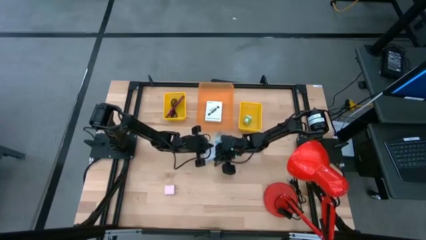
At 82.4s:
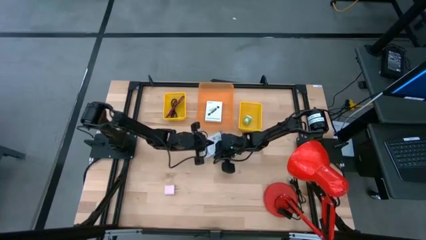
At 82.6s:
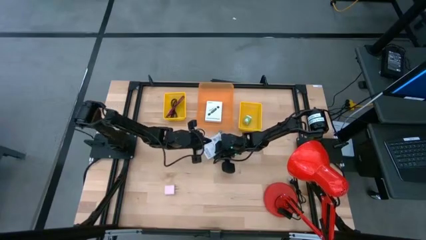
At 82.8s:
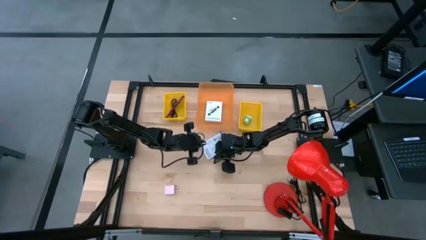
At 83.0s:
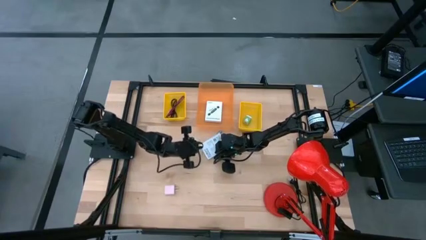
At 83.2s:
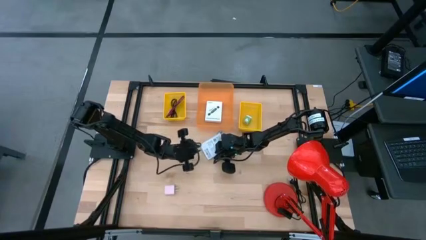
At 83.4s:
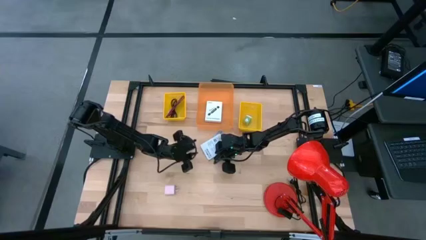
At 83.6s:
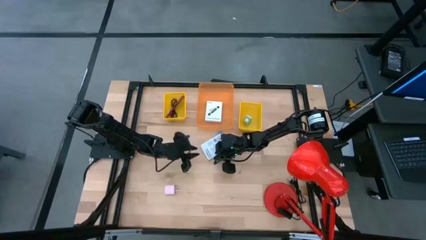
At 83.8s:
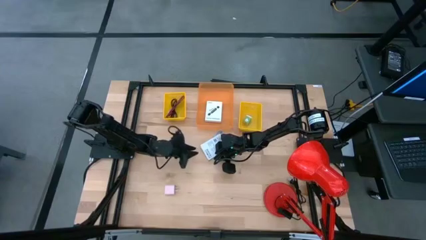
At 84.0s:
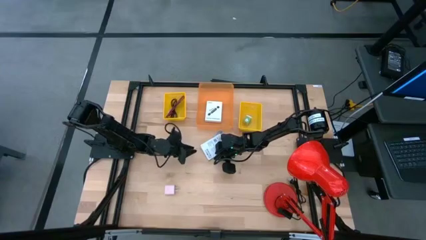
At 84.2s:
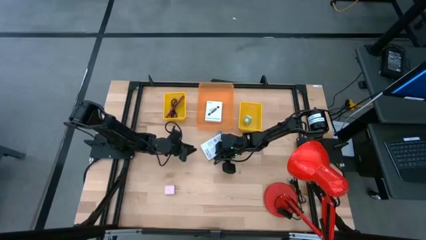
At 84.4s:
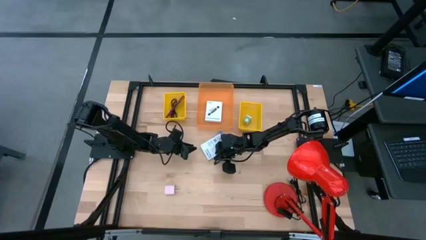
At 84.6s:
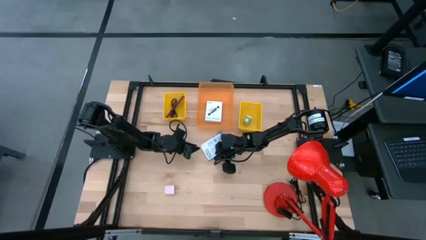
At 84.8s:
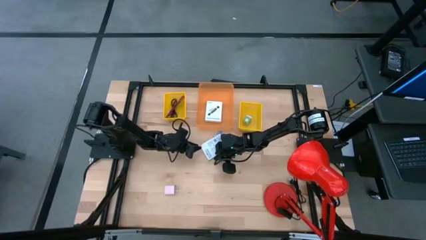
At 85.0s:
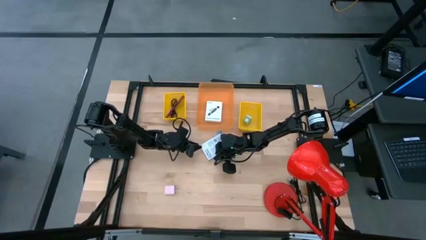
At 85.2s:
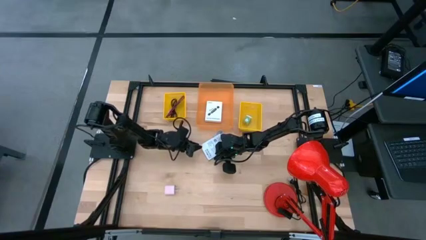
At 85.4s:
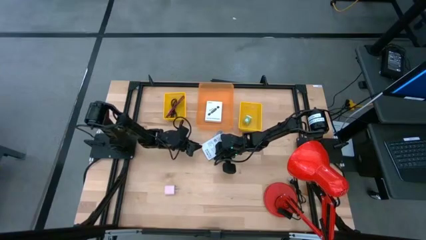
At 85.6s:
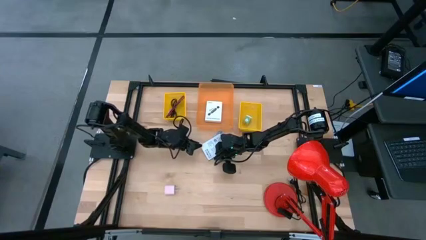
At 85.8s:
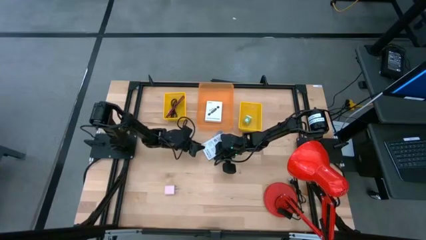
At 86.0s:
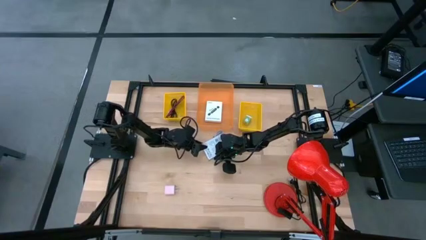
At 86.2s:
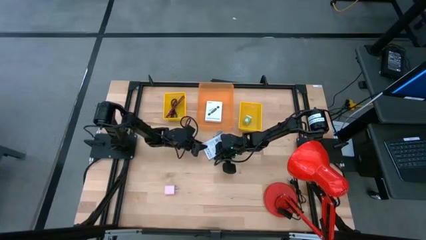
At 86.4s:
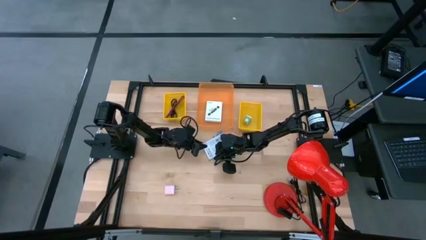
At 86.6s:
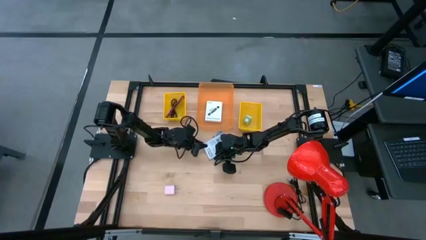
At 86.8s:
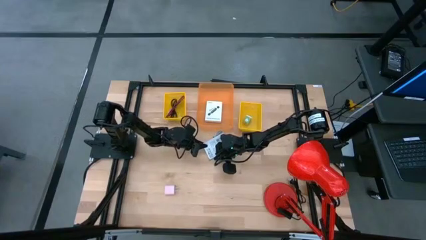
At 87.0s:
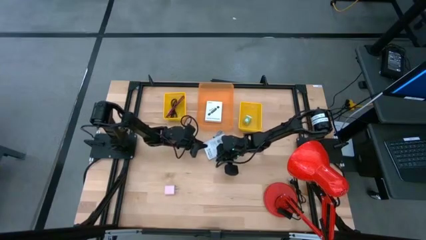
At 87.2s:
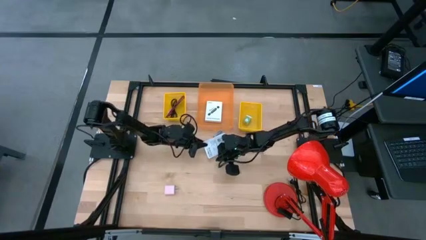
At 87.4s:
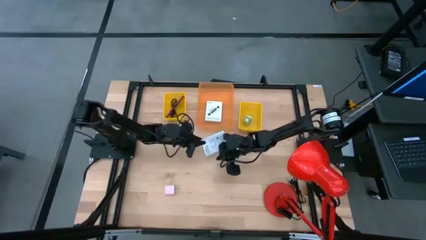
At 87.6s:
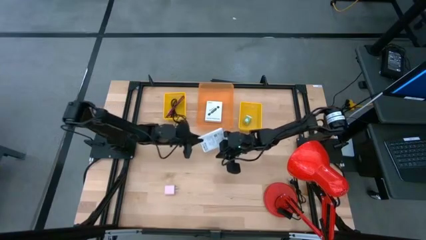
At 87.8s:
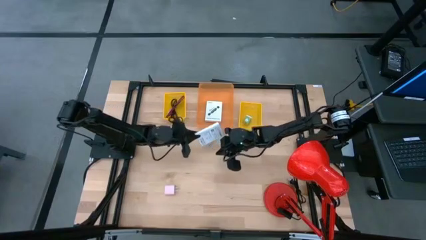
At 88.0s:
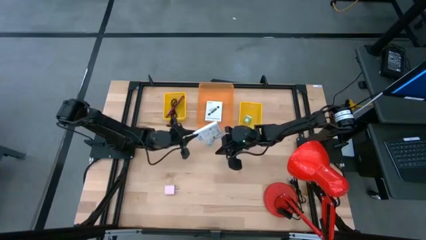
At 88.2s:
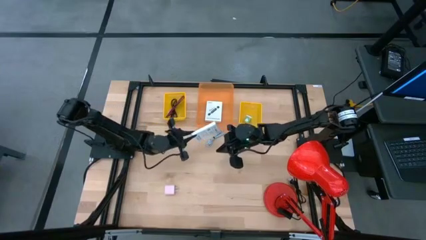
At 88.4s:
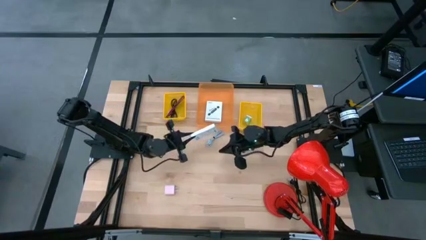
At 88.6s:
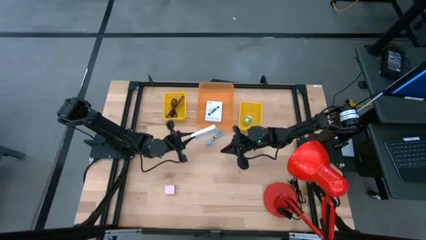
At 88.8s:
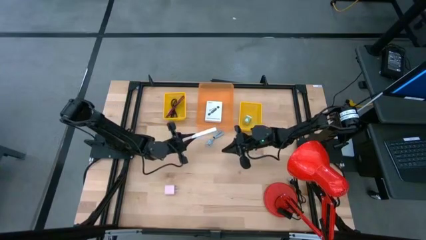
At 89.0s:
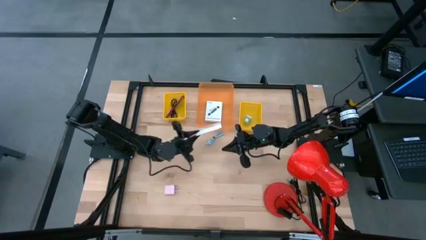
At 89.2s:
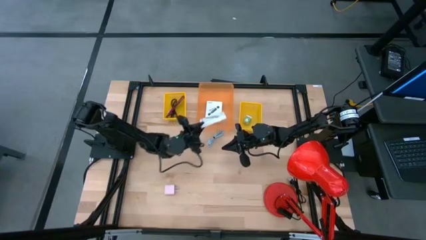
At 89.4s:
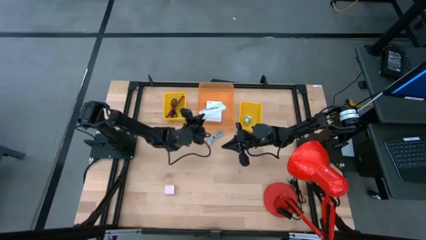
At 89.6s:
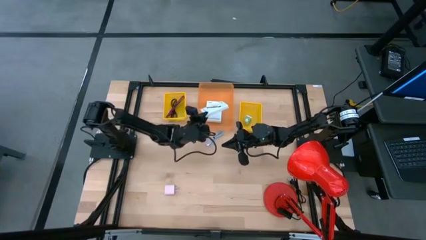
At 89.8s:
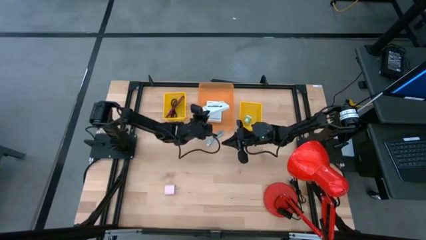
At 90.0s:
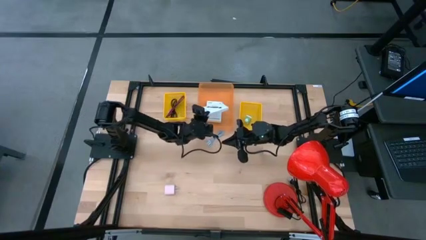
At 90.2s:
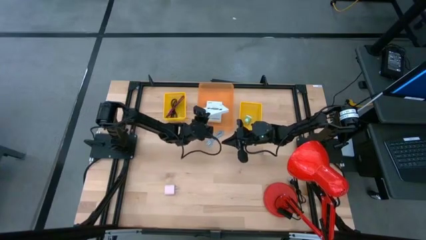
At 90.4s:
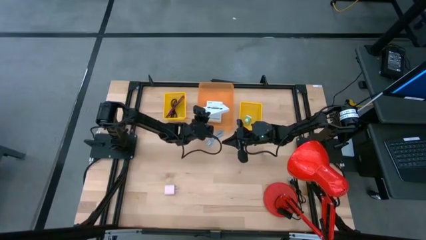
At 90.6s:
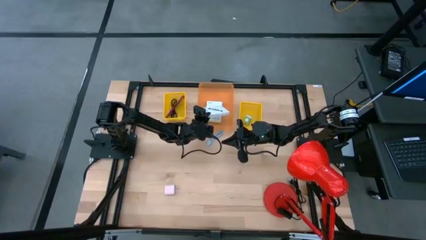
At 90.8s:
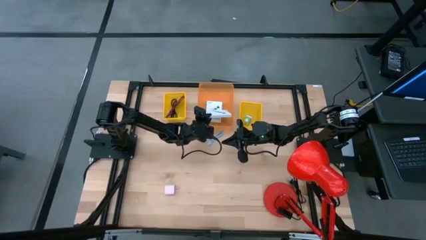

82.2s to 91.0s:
Task: Pick and place items into bin
Put the card reader box into the orange bin

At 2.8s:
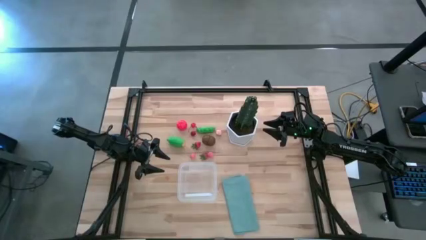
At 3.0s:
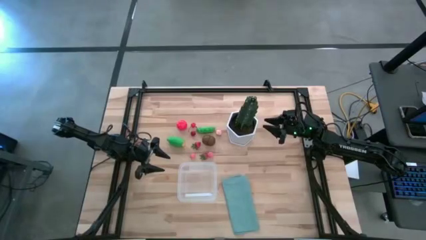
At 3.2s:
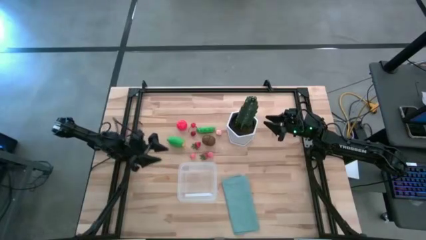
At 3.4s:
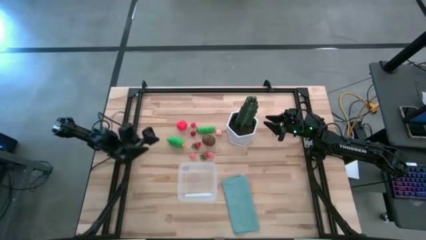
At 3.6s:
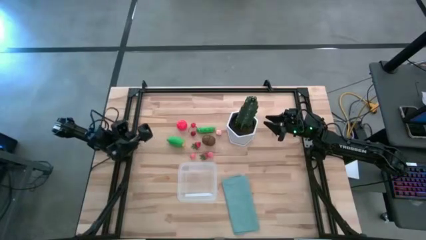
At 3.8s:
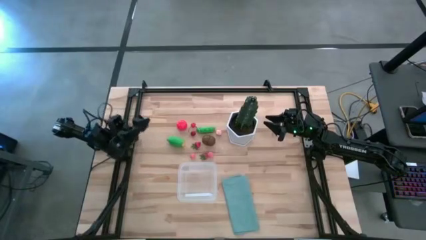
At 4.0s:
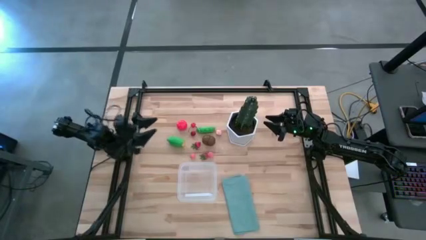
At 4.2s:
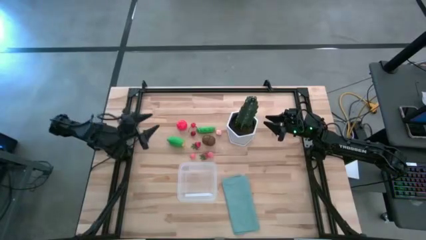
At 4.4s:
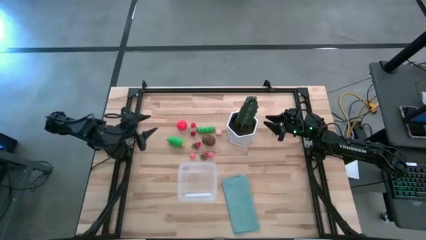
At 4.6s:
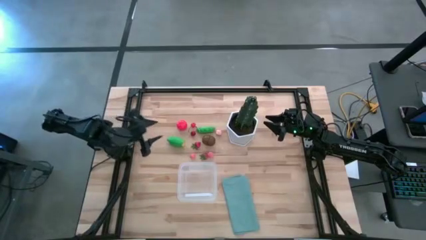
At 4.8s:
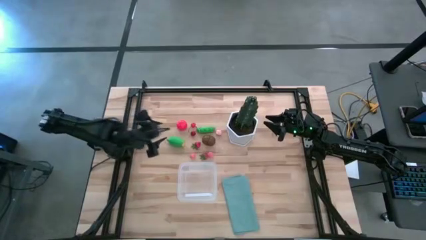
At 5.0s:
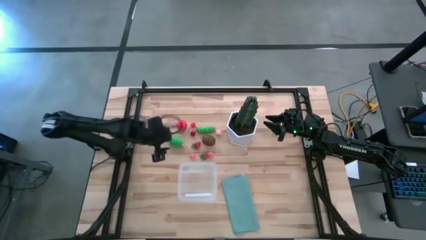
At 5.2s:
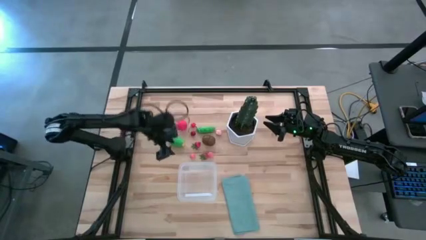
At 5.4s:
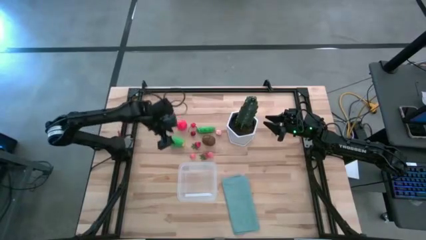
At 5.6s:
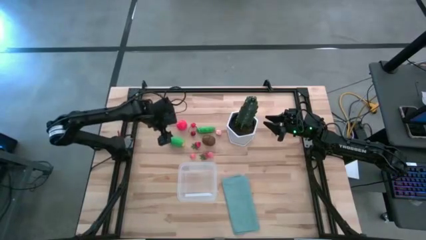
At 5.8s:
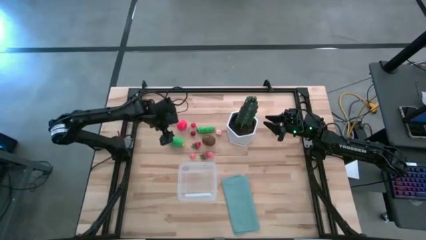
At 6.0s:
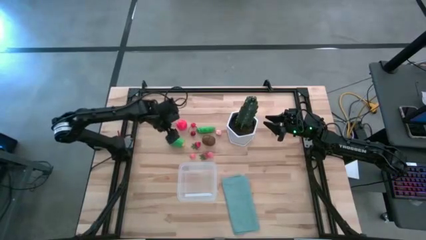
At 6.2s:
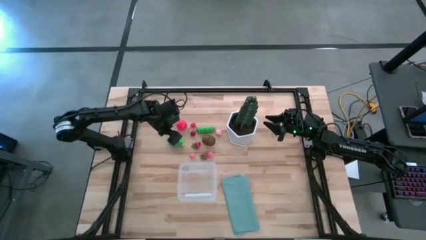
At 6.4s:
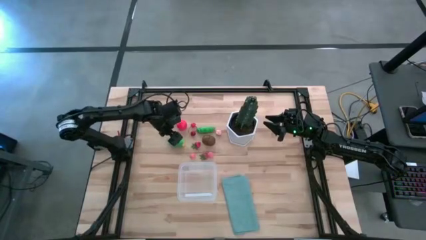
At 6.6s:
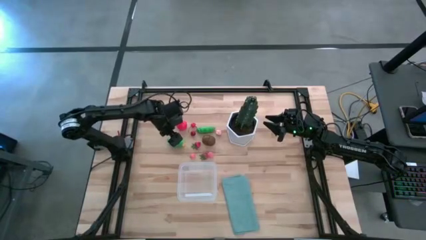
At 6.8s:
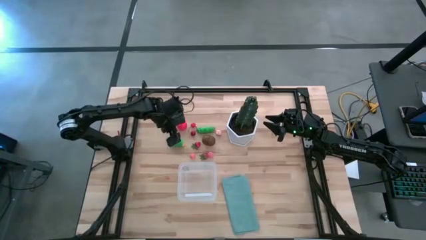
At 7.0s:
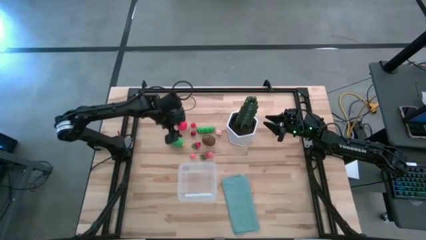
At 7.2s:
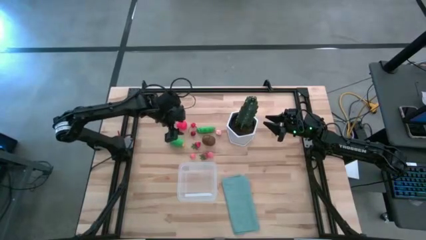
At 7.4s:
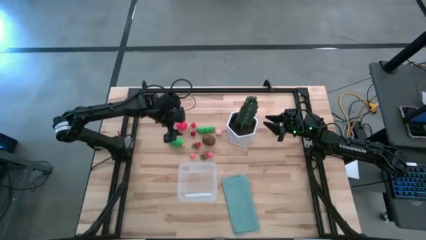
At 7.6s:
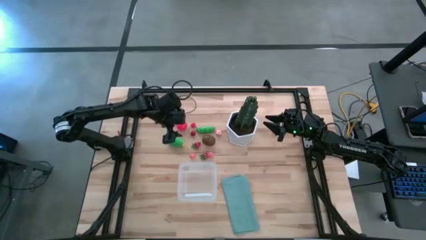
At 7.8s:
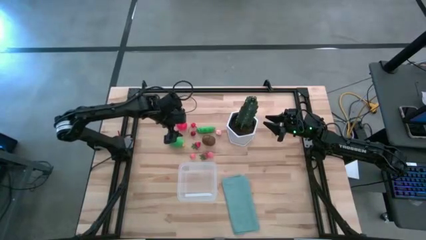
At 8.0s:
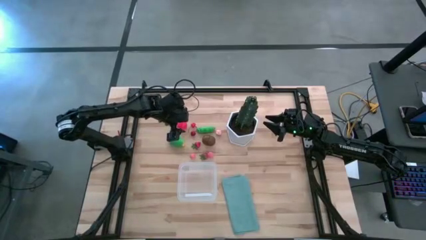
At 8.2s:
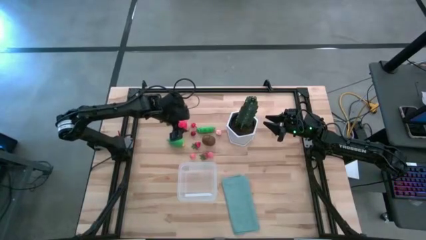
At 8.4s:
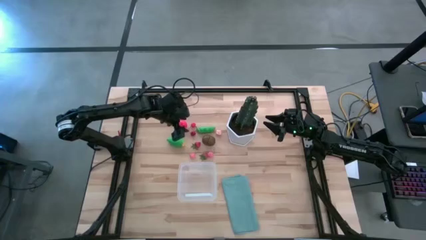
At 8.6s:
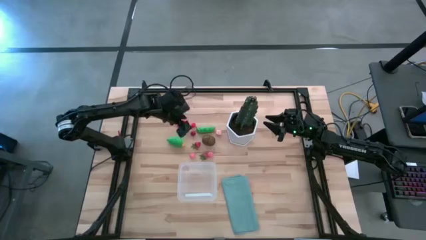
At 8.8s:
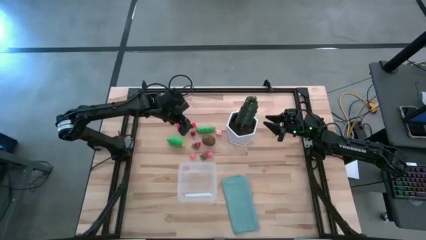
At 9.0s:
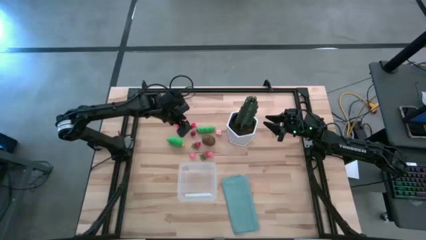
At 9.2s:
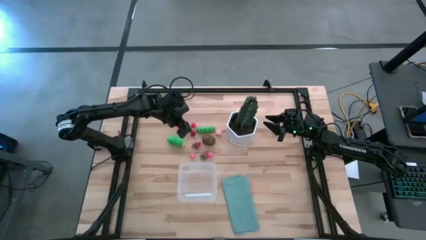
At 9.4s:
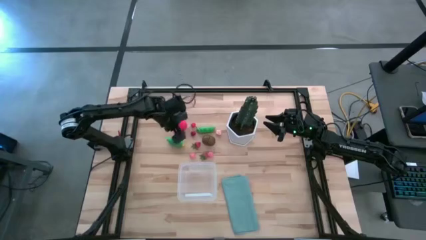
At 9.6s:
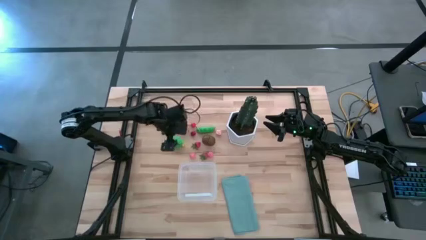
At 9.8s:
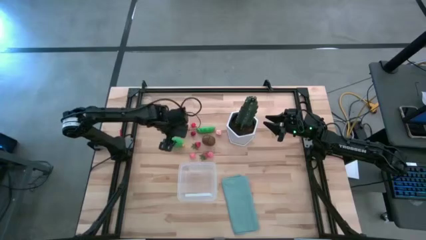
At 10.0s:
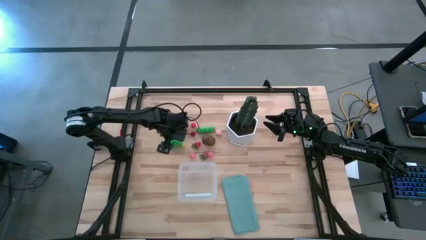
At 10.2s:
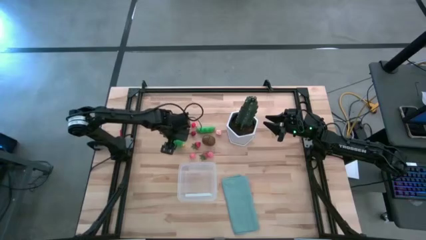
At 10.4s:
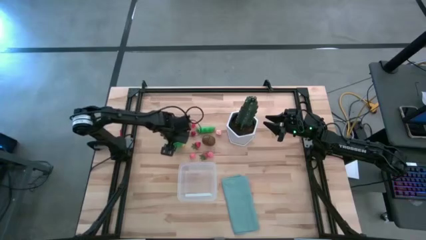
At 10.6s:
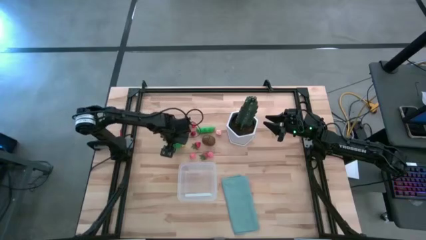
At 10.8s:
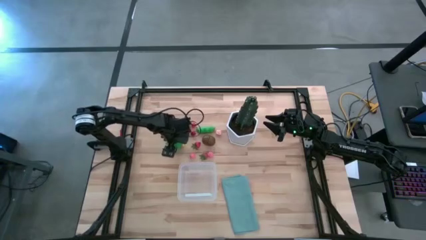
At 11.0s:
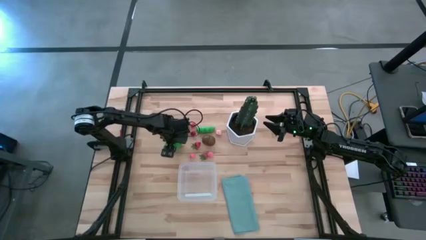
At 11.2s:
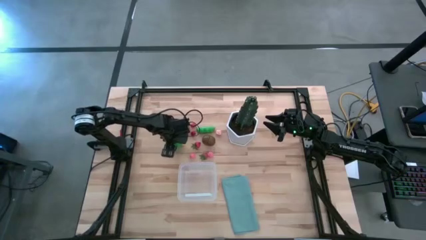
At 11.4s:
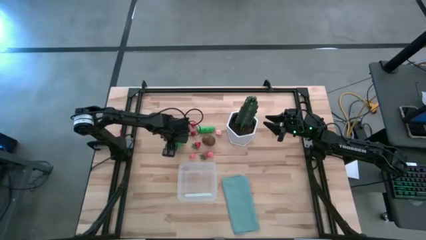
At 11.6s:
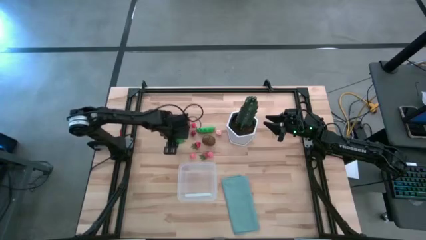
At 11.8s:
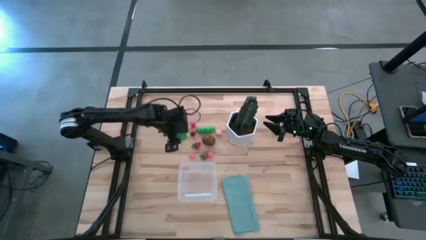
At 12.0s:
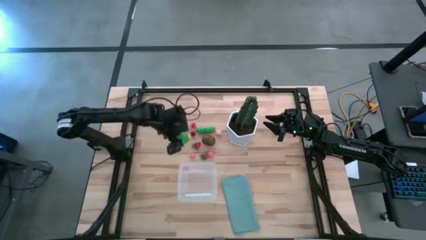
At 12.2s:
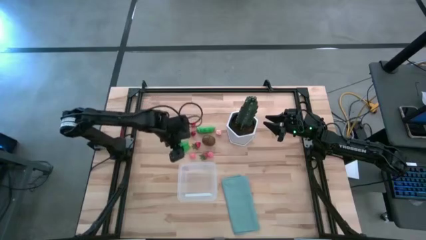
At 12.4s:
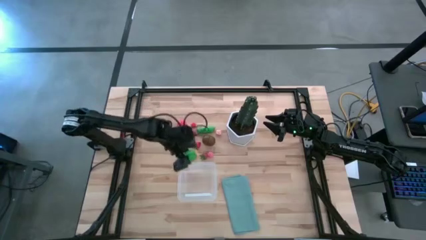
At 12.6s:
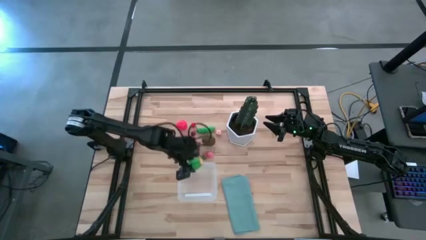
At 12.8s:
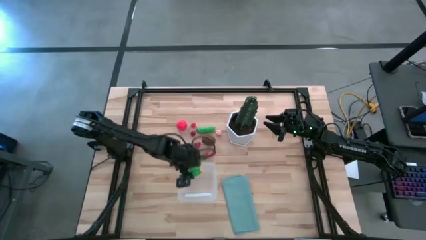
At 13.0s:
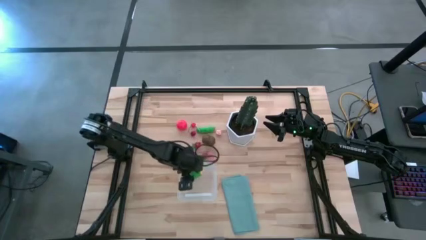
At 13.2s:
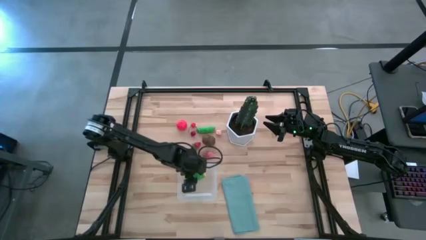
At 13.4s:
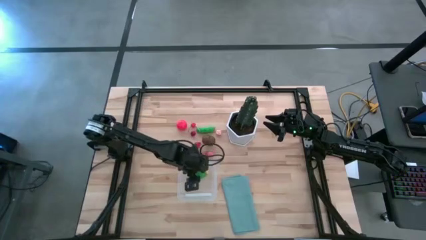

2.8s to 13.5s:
Task: Pick and placing Produce into tupperware
Put the green corncob into the transparent bin
